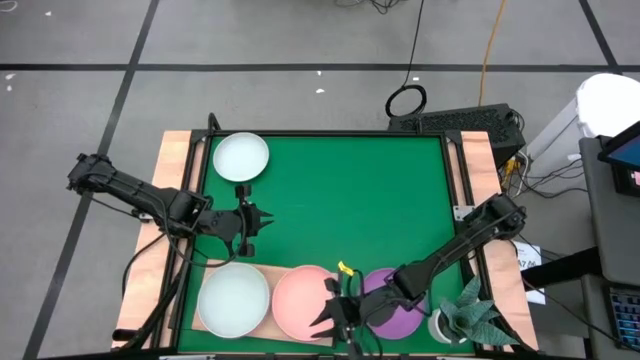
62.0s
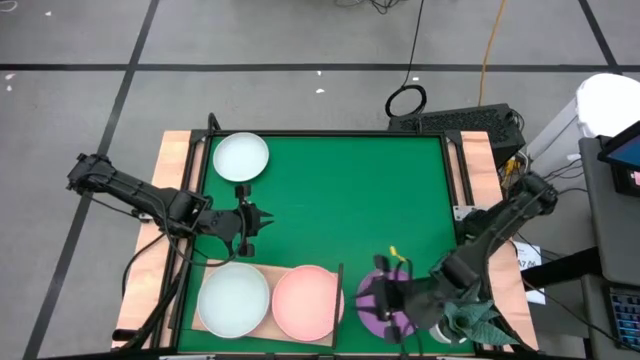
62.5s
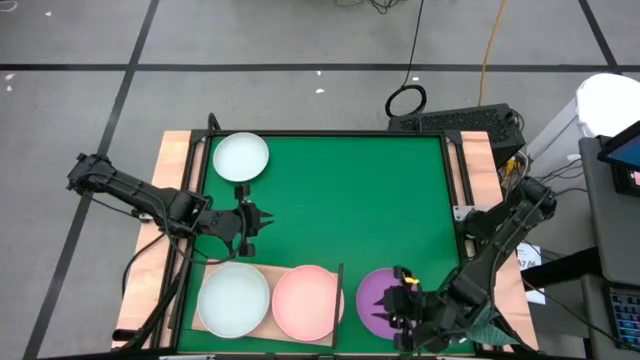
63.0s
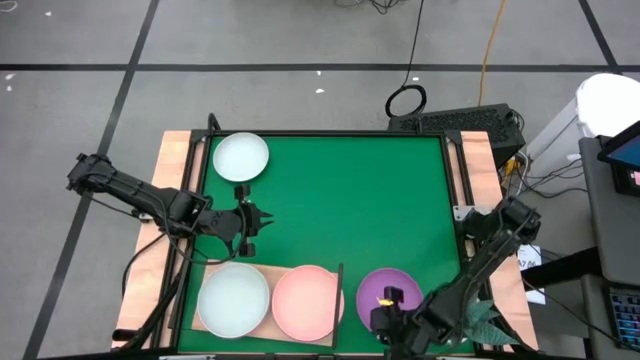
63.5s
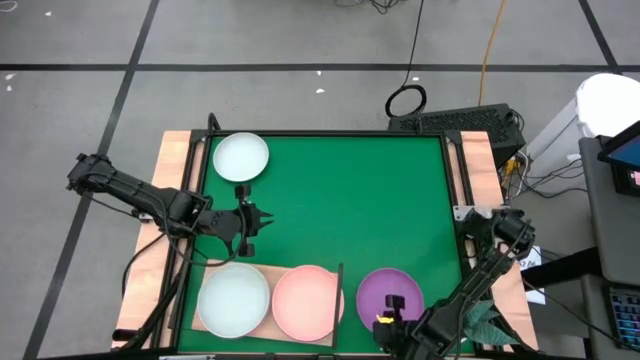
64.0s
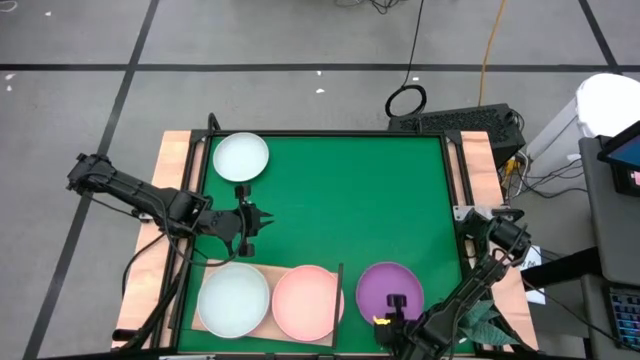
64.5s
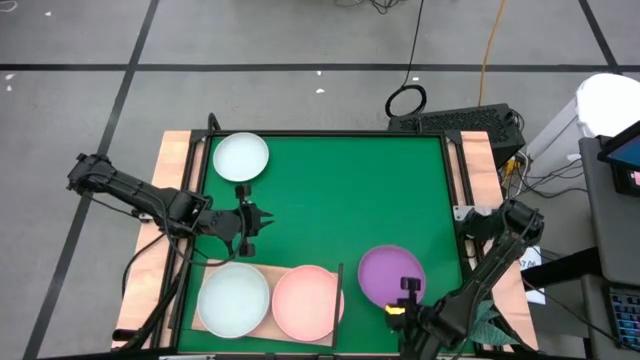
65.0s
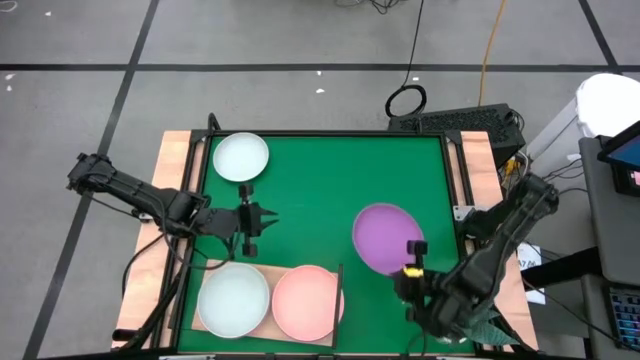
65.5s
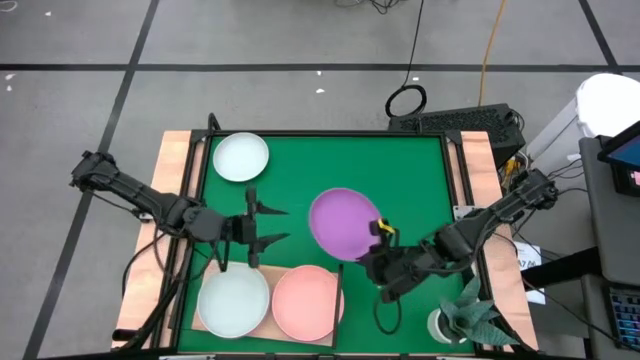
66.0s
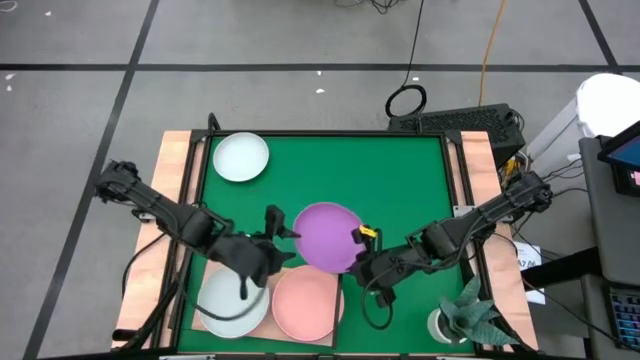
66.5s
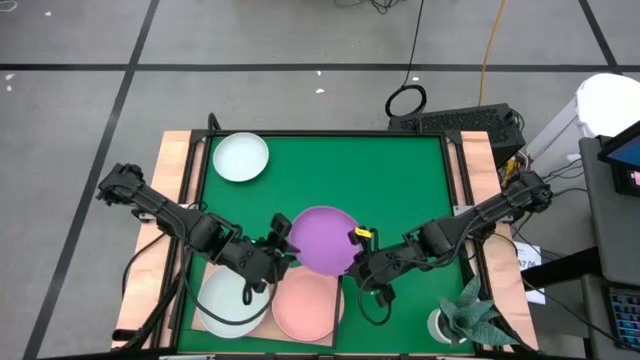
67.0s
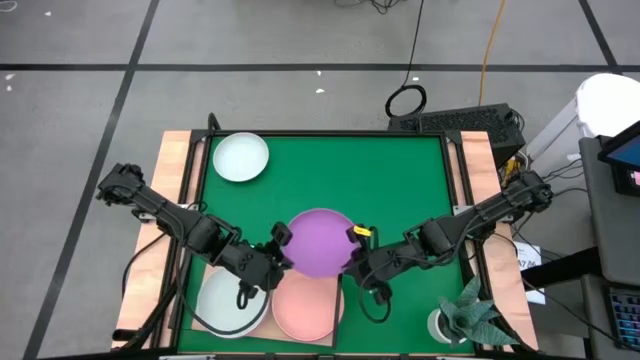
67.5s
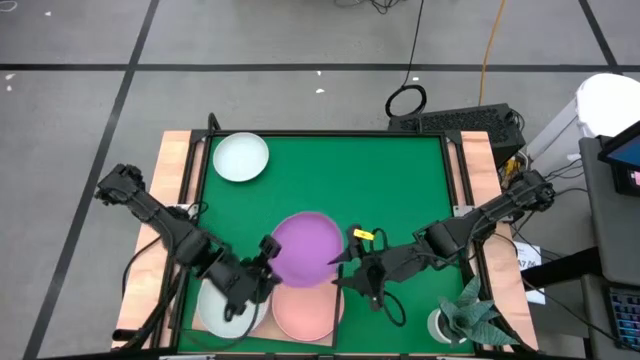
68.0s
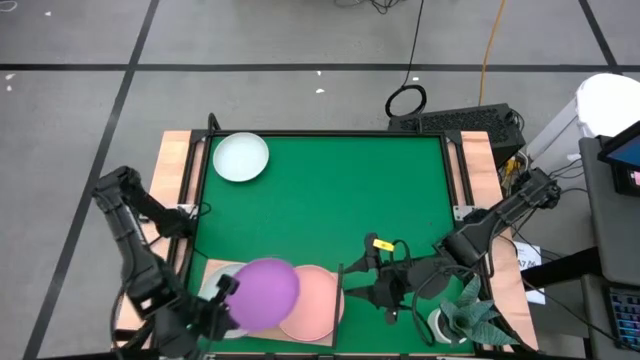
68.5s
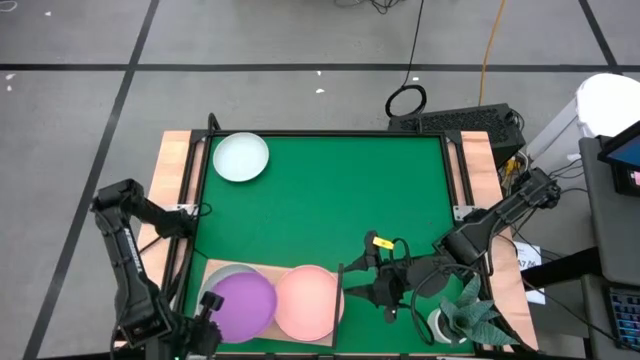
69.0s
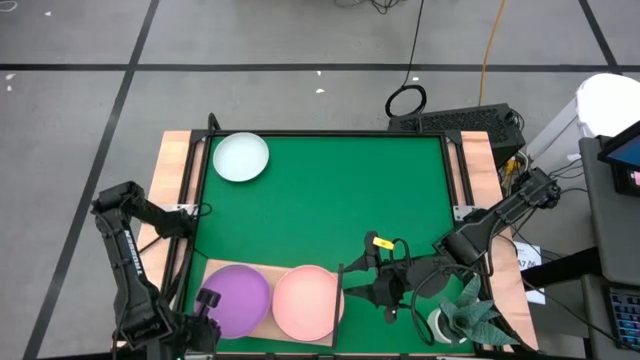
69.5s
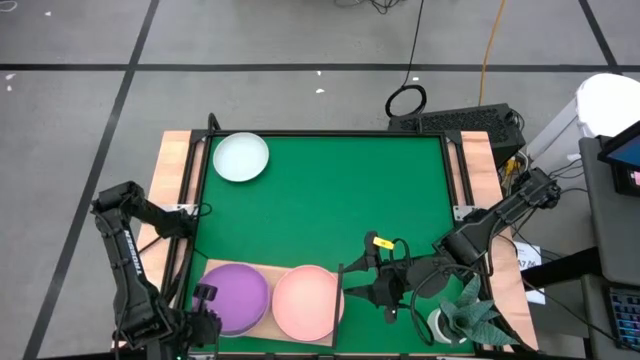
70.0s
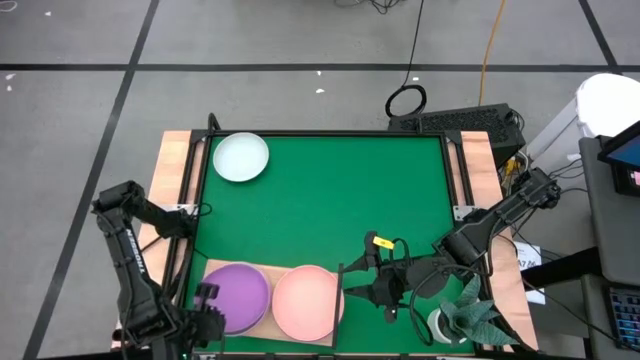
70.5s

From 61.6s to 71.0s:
Task: Place and stack plates onto a shelf
Stack the purple plate on top of the white plate on the shelf

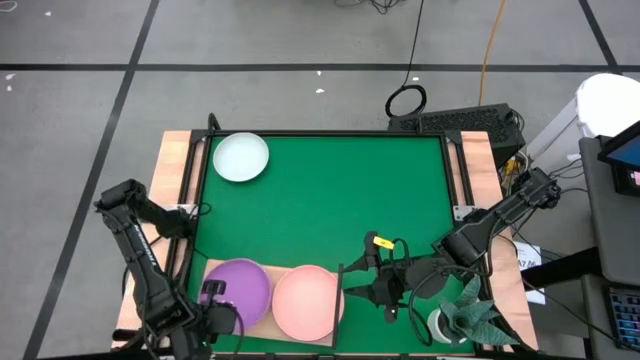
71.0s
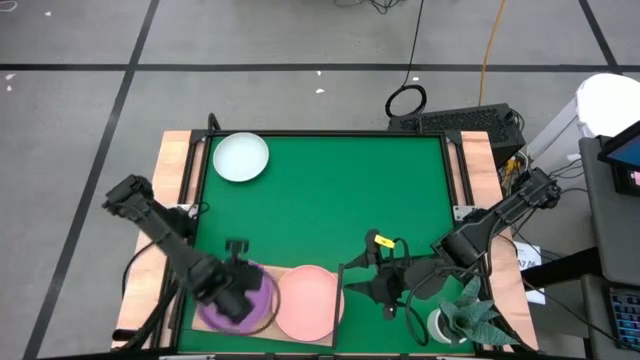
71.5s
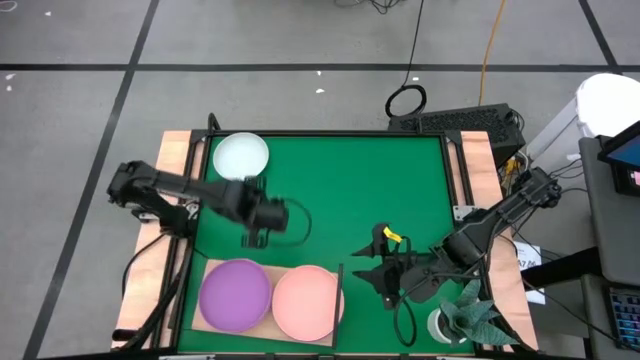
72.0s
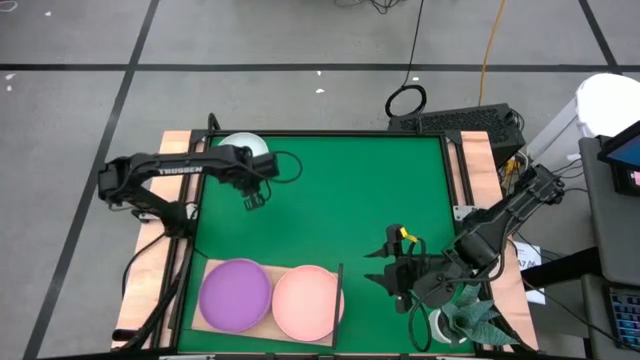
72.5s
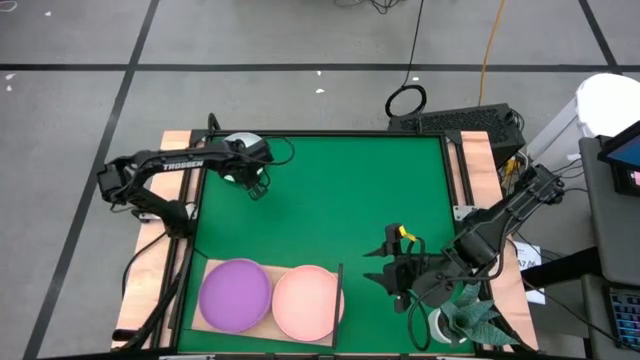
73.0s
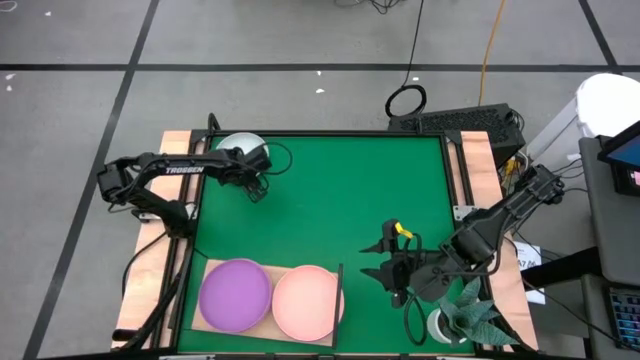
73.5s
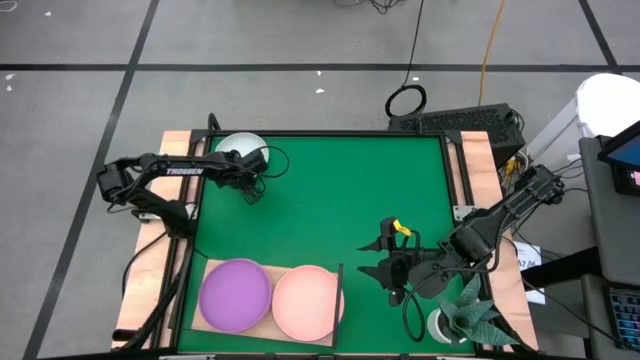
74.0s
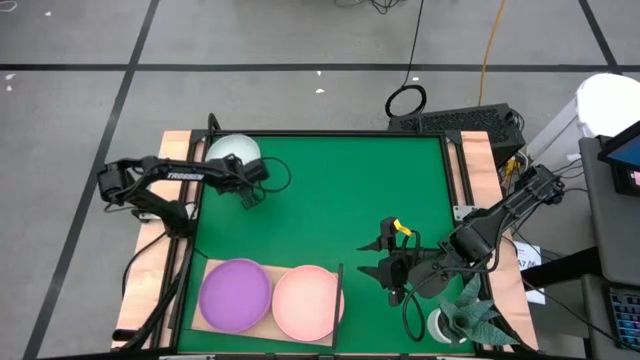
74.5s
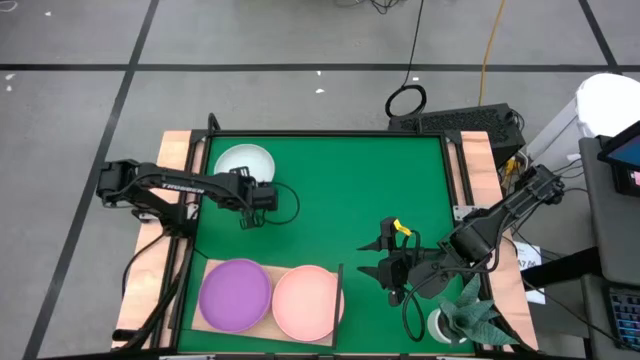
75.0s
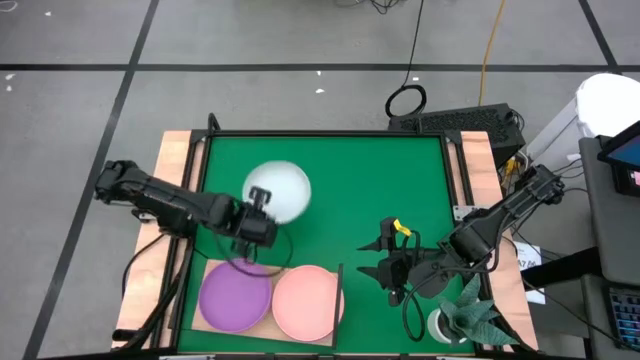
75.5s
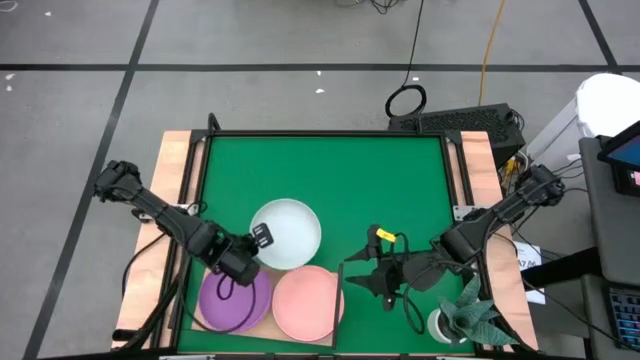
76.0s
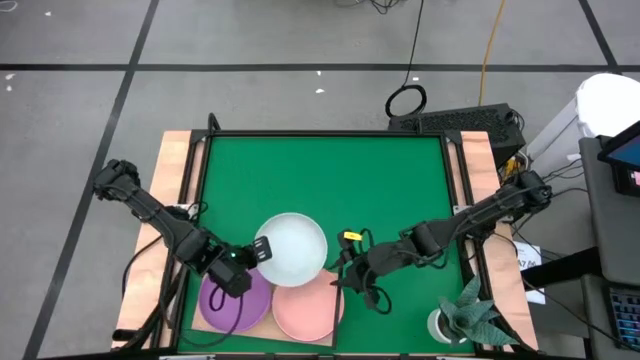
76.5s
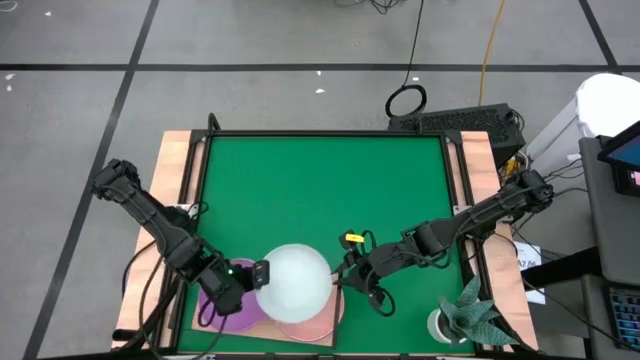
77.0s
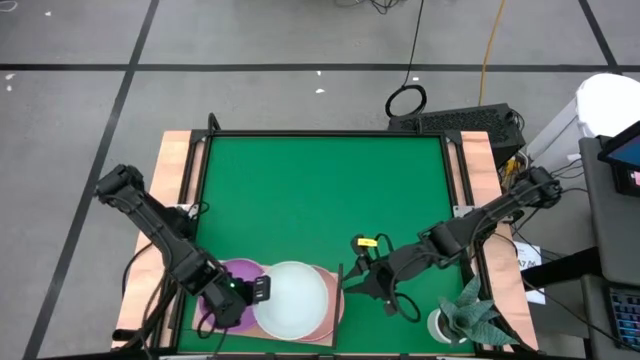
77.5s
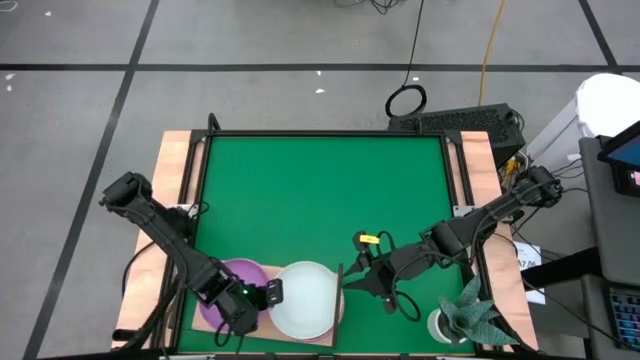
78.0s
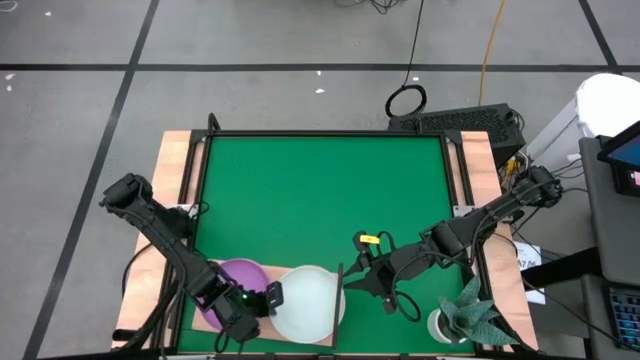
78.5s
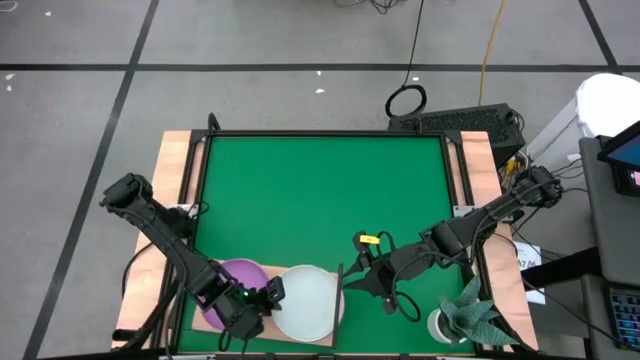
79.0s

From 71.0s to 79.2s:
Stack the white plate on top of the orange plate on the shelf

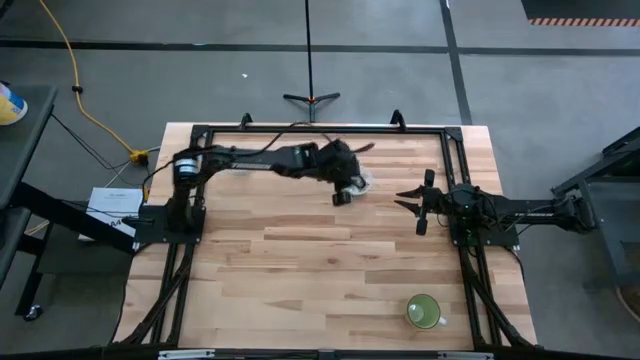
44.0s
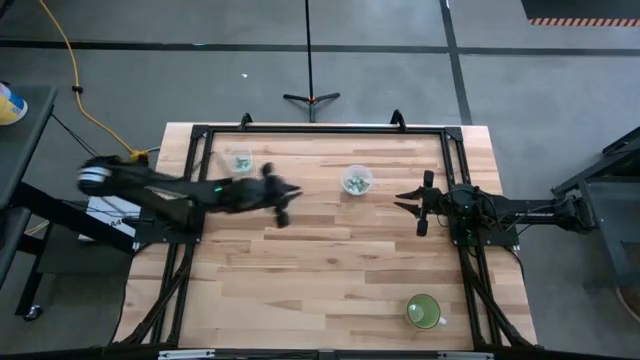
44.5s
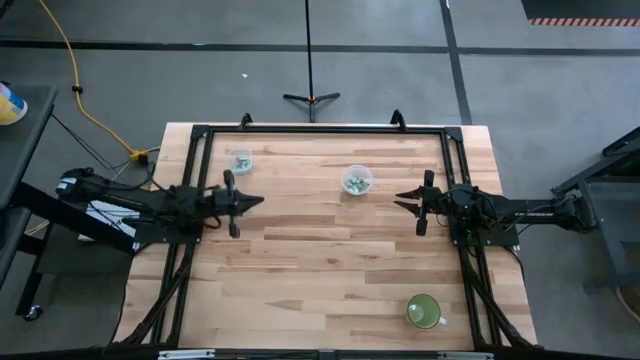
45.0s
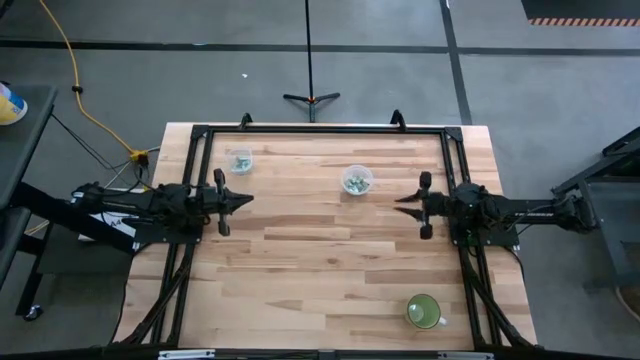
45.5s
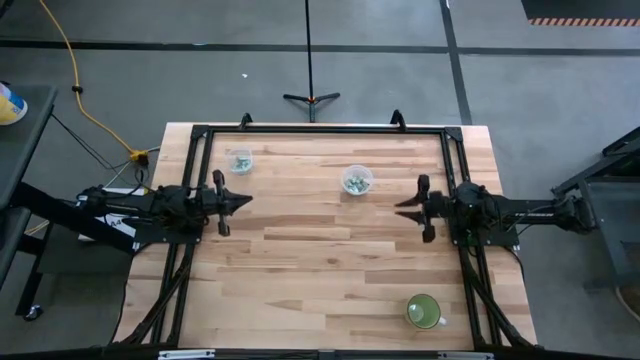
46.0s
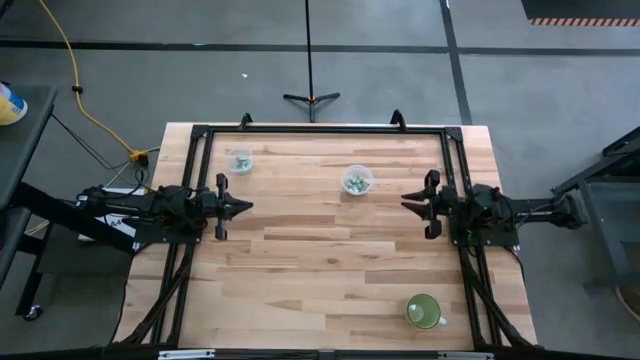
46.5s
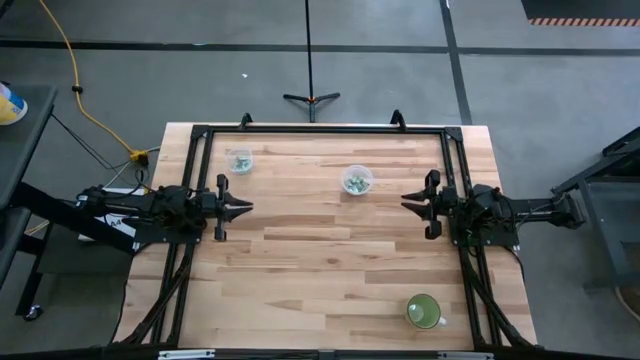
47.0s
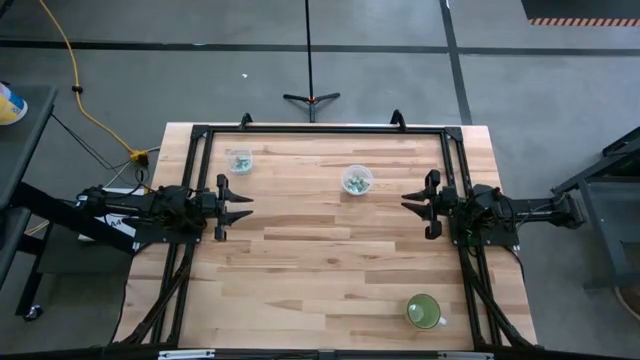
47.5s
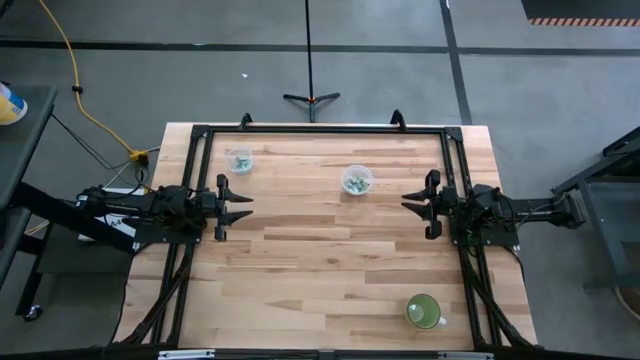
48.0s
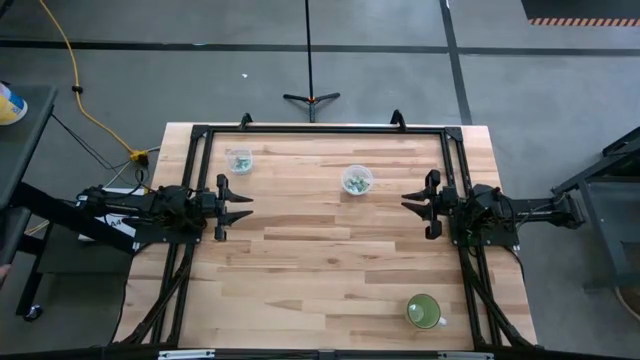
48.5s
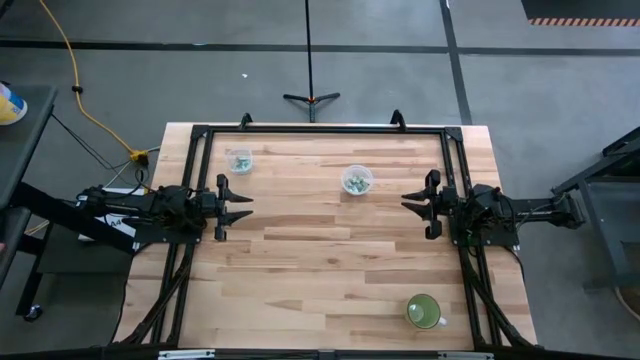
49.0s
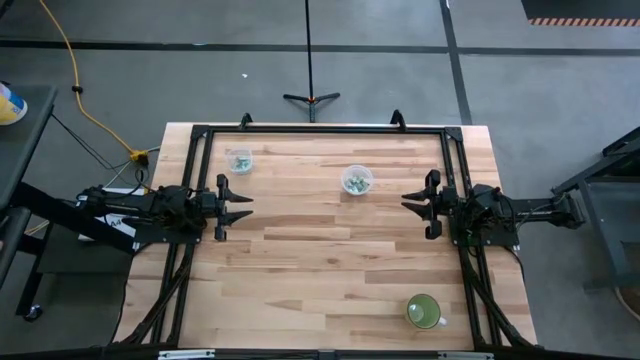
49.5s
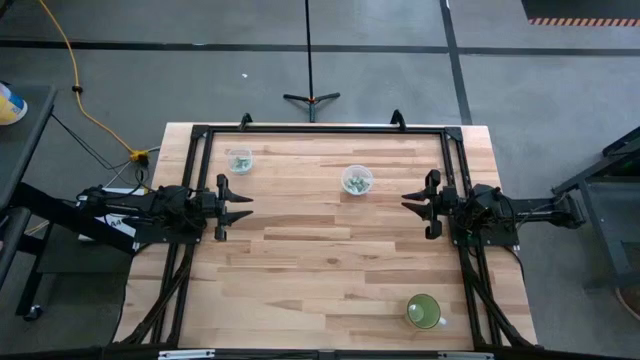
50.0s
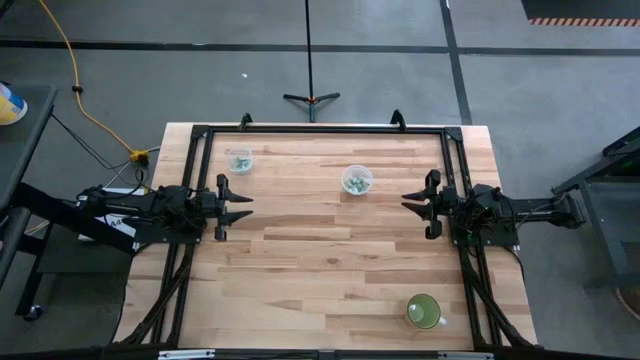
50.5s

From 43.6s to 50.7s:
Task: Pick and place Stevia / Truvia into bins
Return to Home Position
